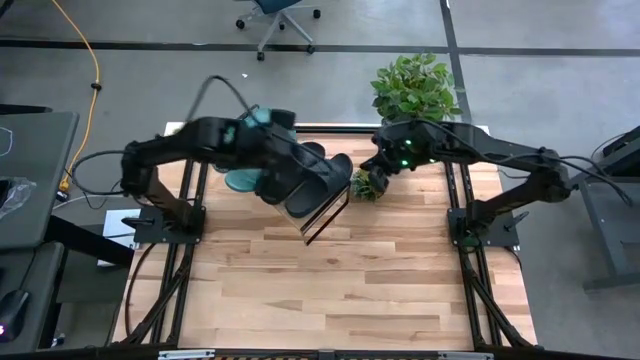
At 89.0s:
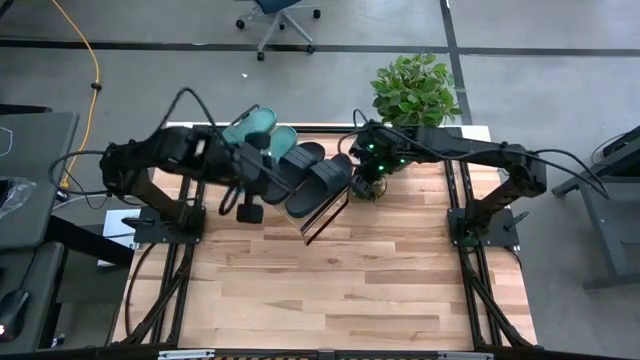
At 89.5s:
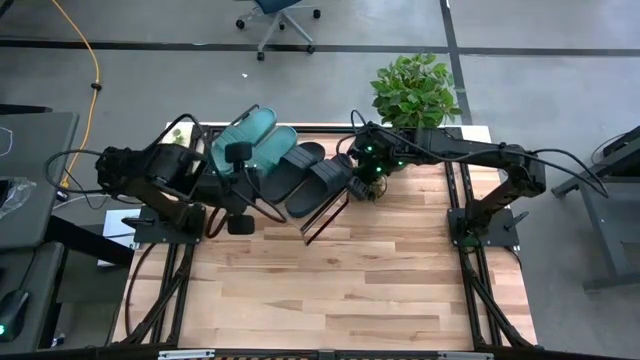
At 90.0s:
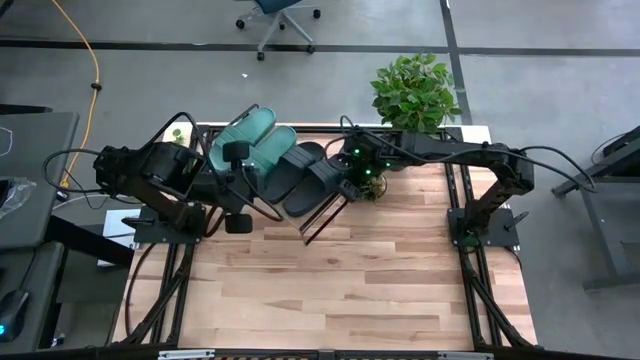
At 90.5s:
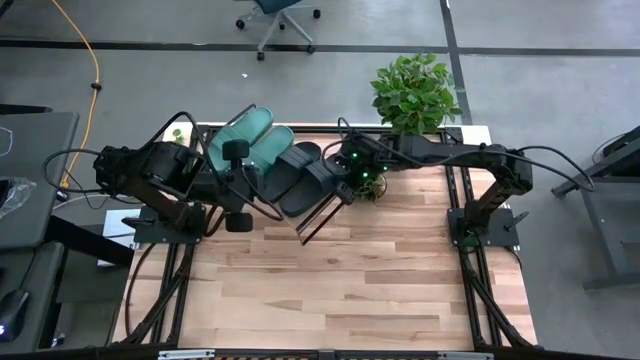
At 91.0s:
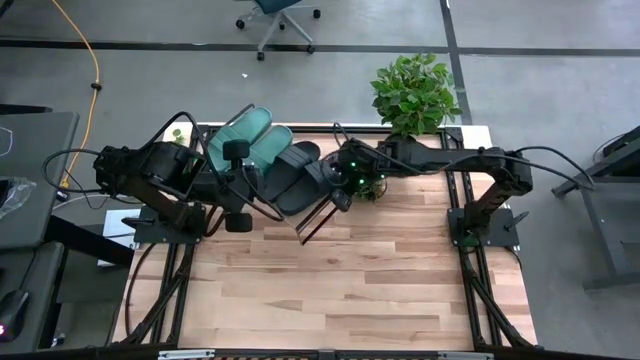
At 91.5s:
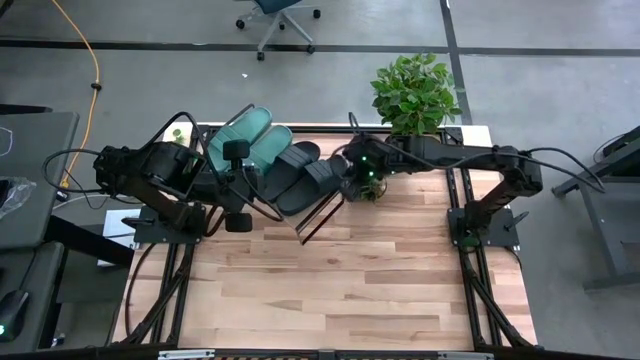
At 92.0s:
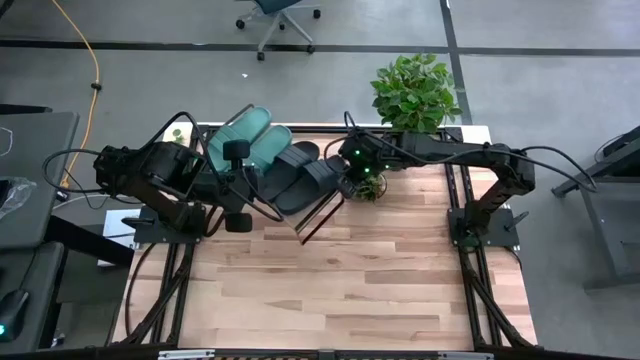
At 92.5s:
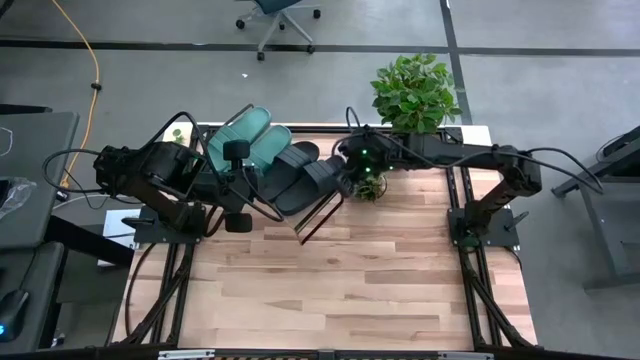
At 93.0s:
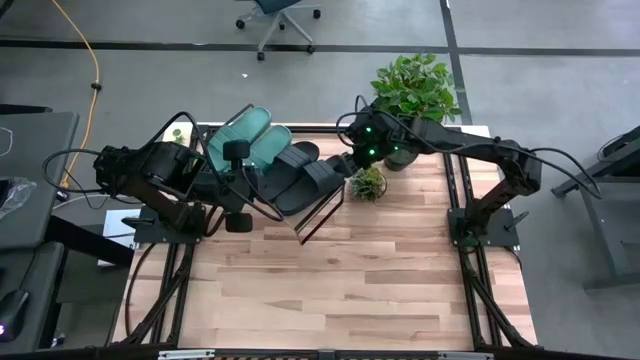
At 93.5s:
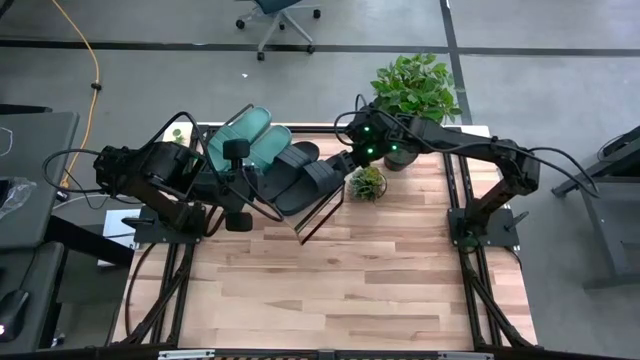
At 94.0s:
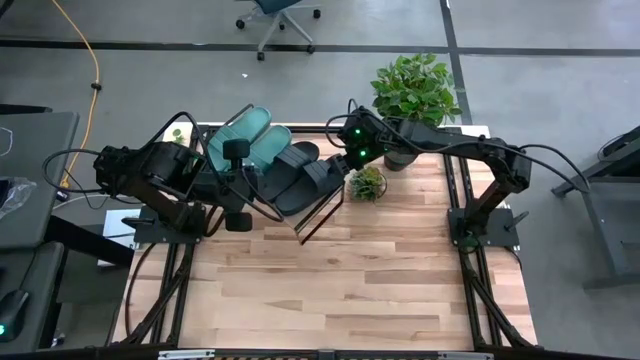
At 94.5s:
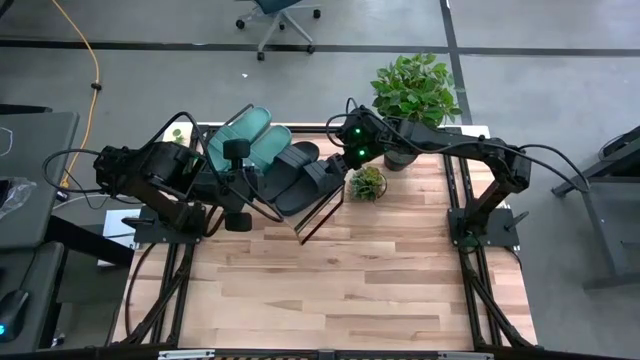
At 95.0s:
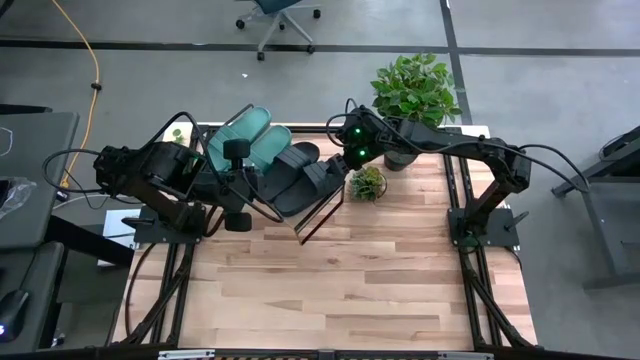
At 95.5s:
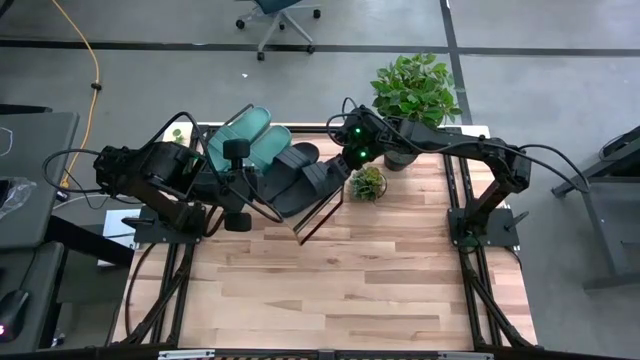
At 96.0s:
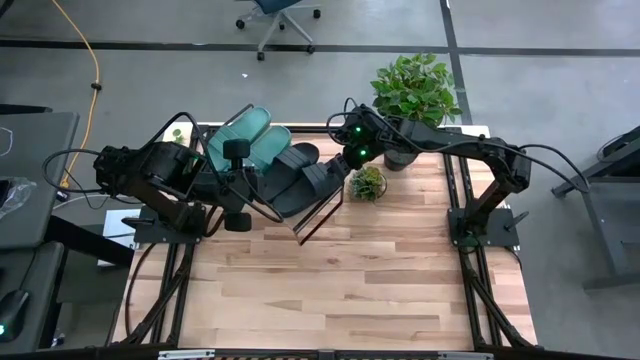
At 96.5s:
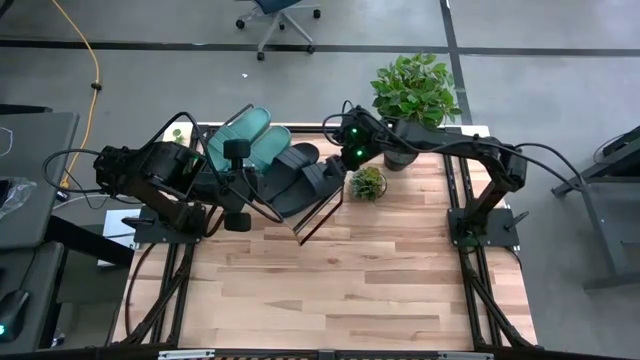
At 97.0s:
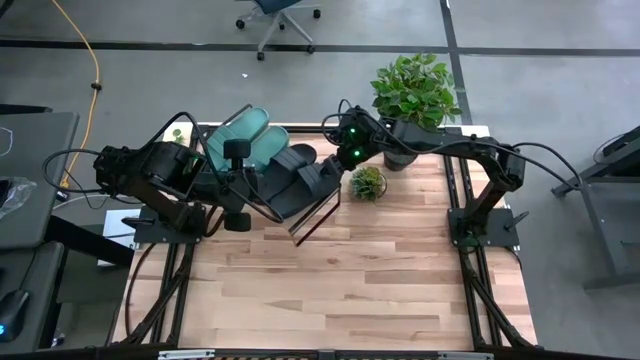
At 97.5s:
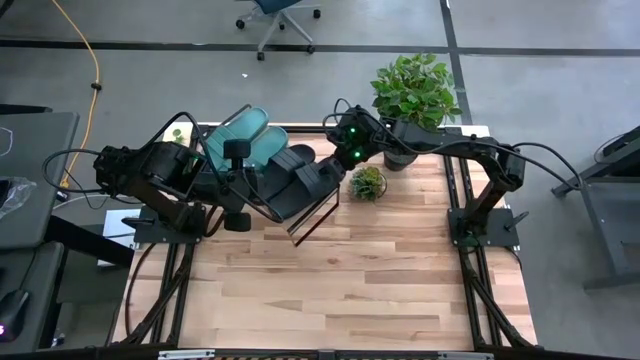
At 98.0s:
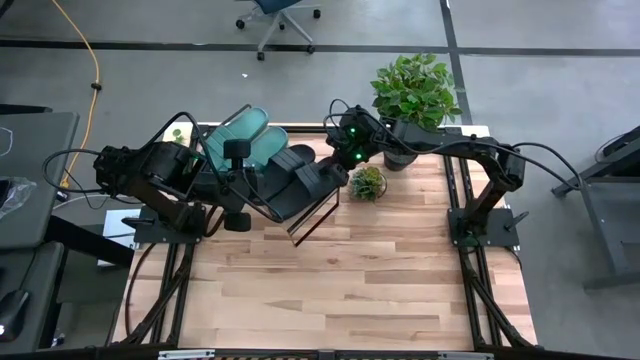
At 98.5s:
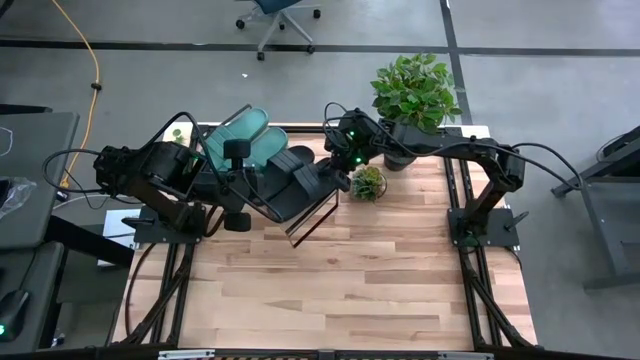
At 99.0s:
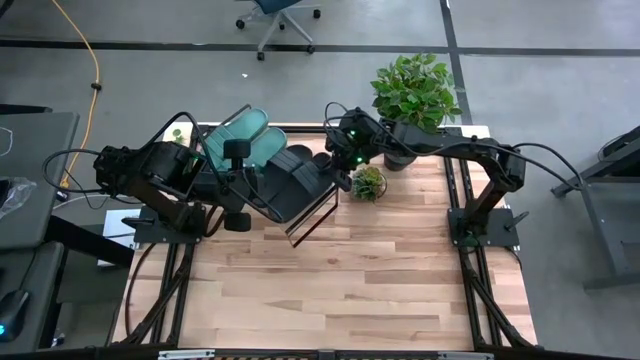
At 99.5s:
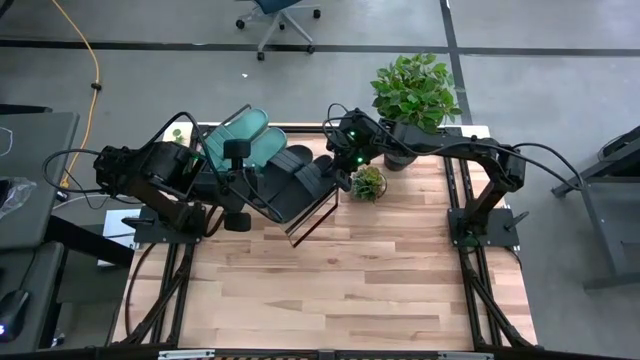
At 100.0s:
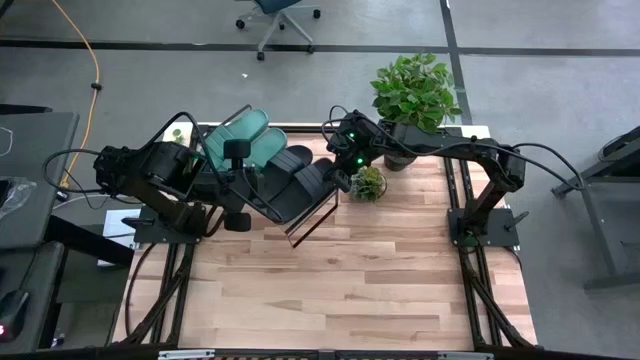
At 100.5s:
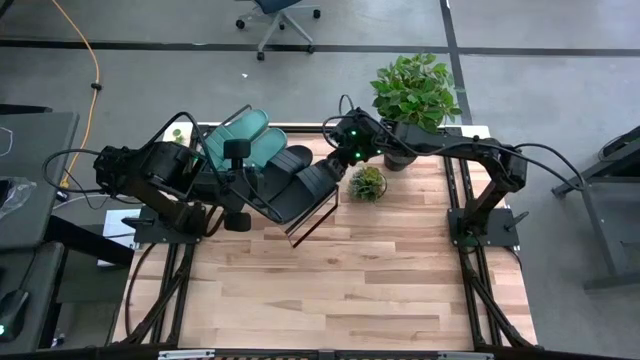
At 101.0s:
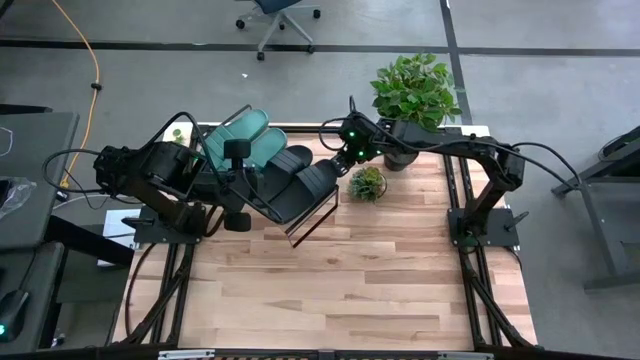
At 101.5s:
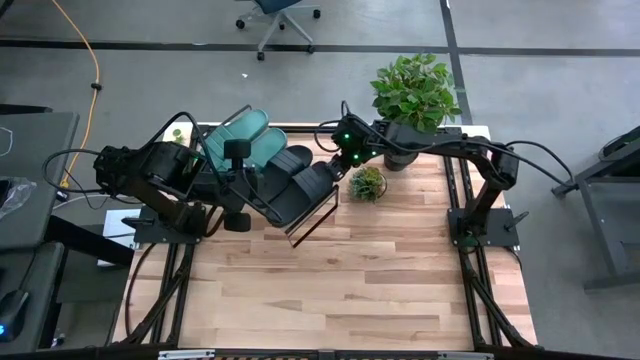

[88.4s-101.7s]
Task: Pick and place slippers onto the shelf
Put the black pair of slippers on the shelf

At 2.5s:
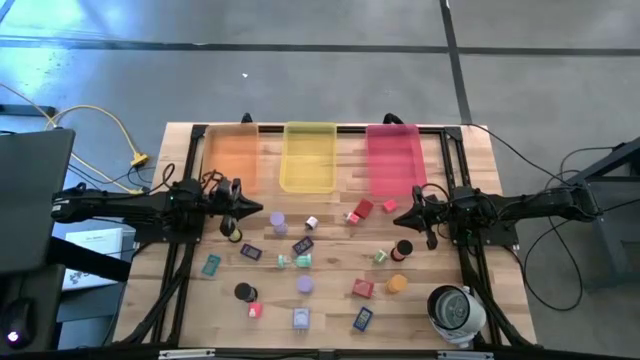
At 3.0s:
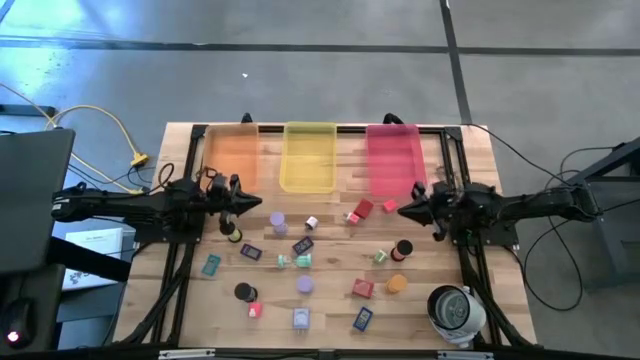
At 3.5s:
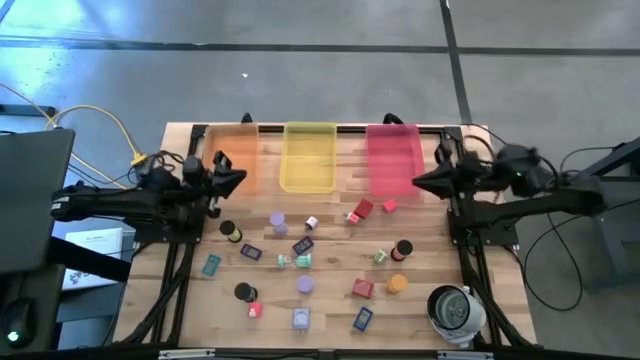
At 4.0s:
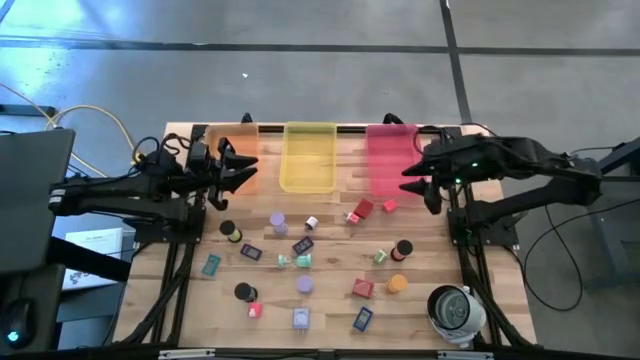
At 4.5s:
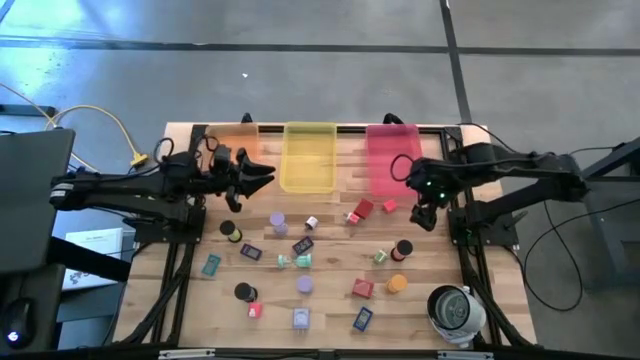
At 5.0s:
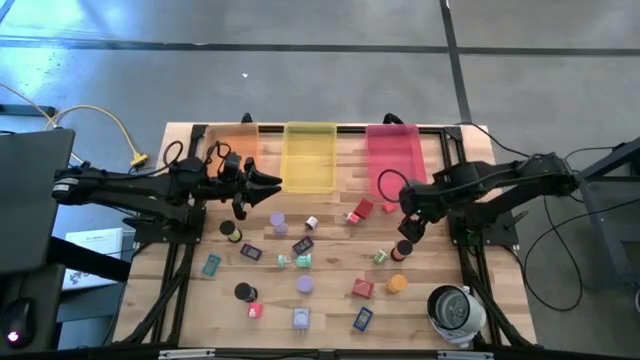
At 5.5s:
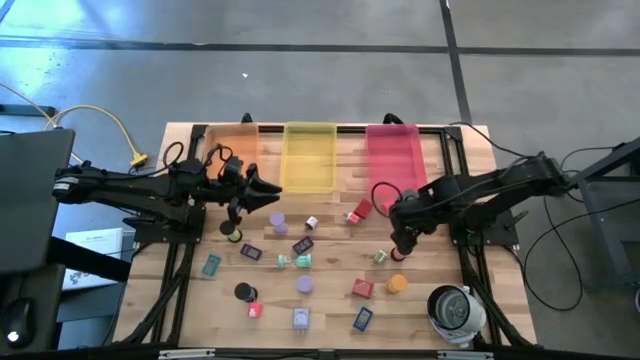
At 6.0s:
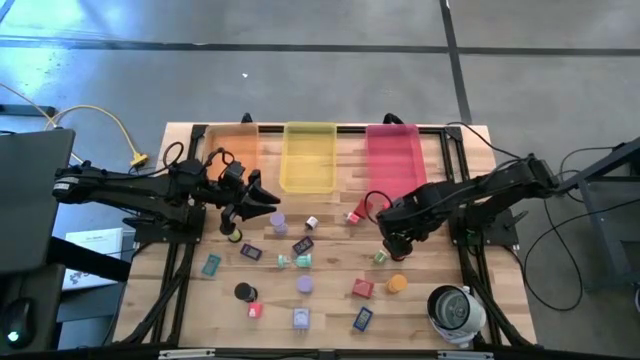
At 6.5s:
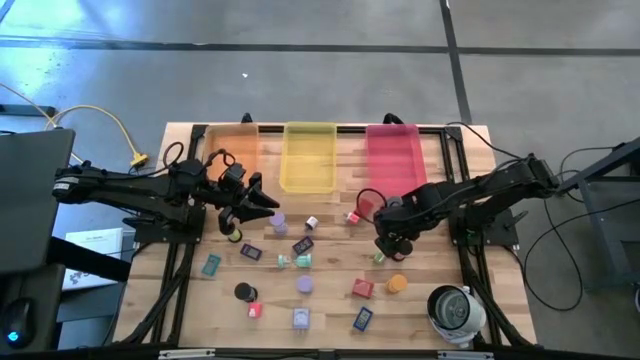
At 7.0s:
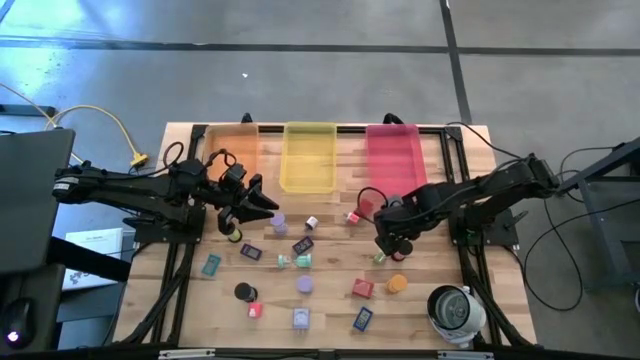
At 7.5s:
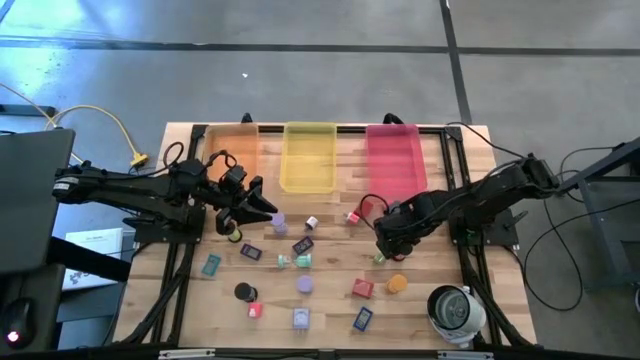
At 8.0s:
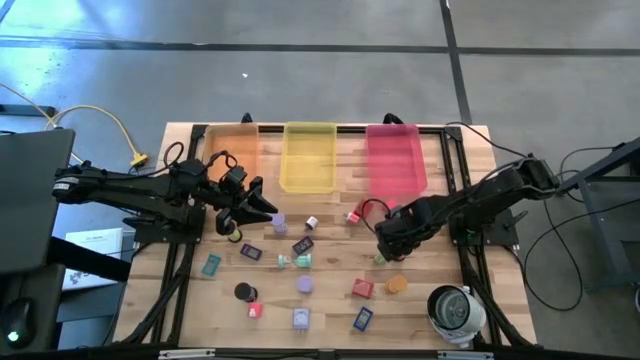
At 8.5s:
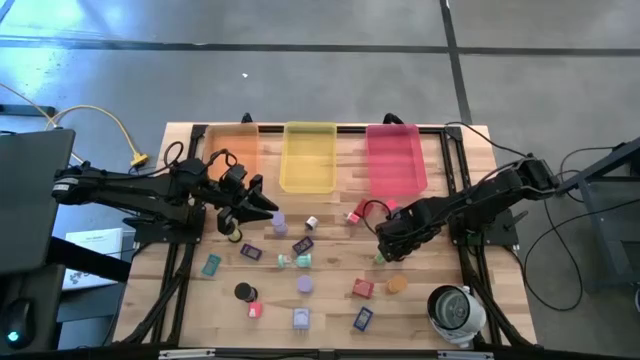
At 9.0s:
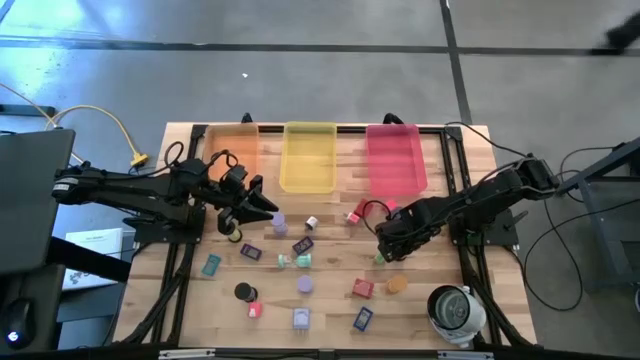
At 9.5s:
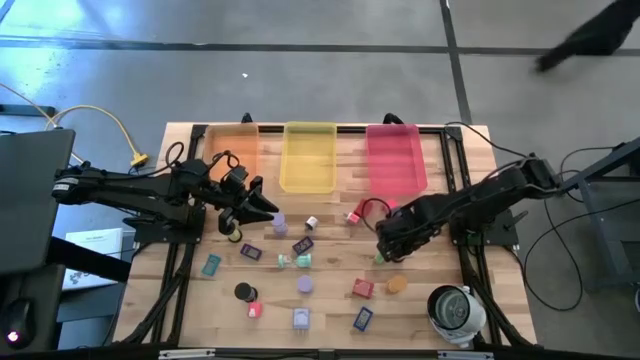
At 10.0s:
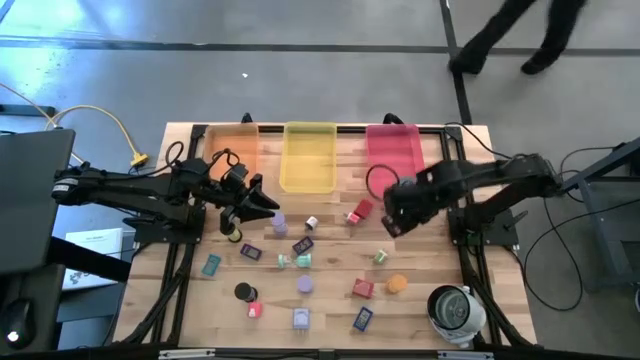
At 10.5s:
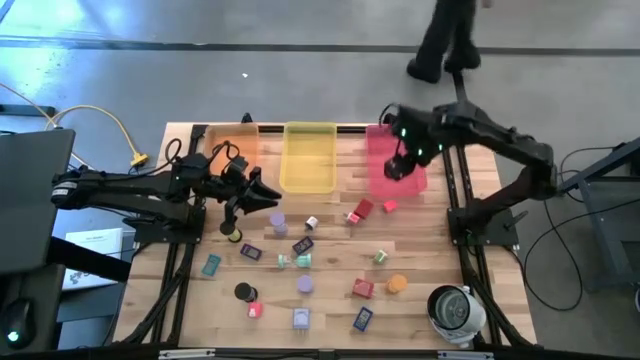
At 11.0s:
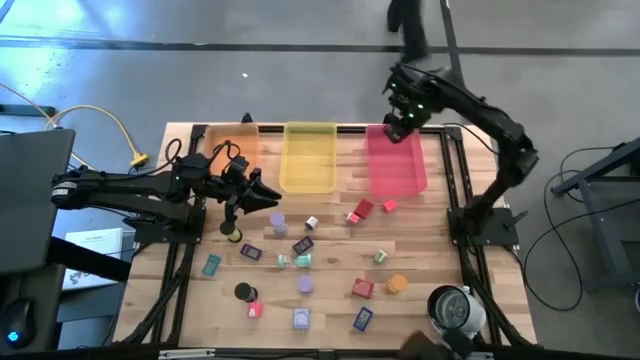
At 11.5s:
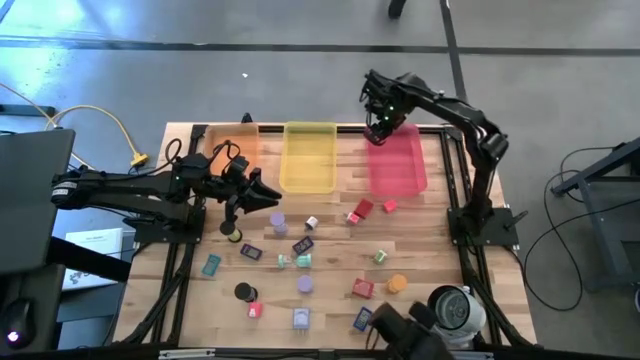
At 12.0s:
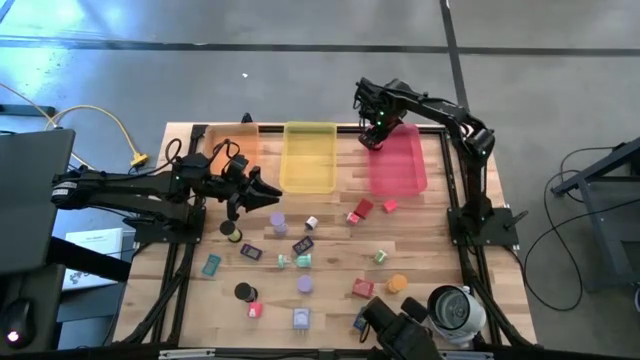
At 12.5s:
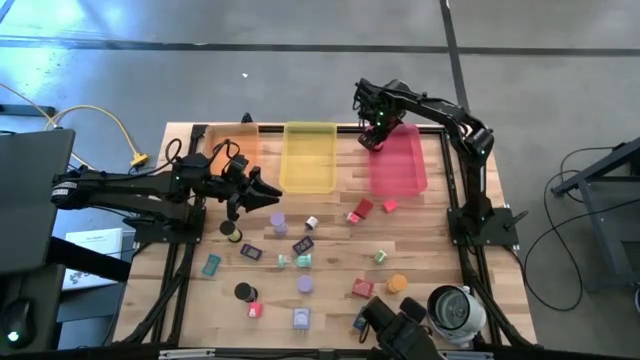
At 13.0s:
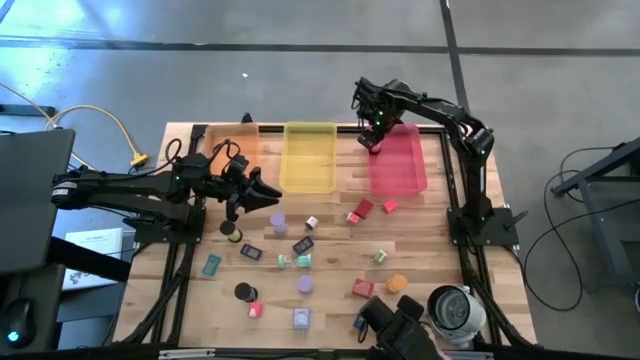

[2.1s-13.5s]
Task: Pick & Place Office items
Put the pink sand timer into the pink bin
